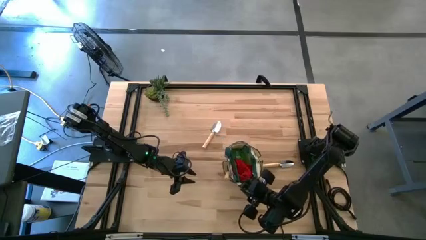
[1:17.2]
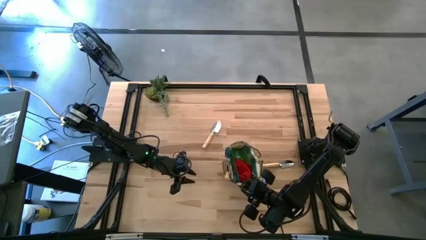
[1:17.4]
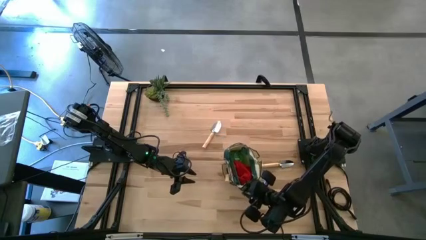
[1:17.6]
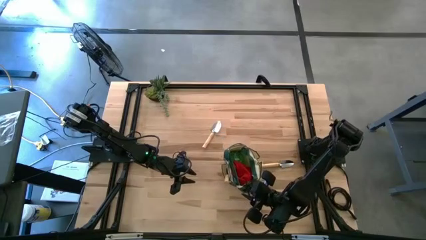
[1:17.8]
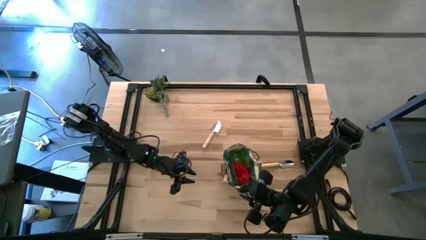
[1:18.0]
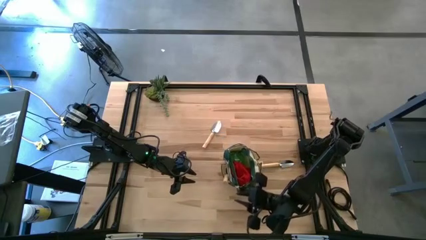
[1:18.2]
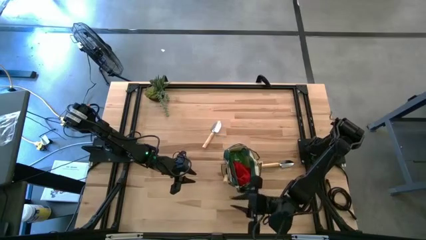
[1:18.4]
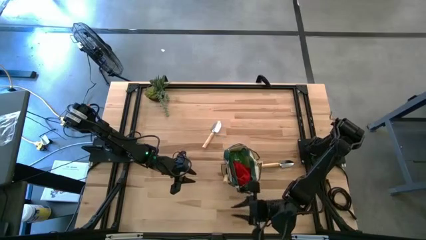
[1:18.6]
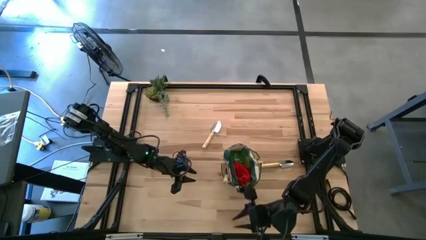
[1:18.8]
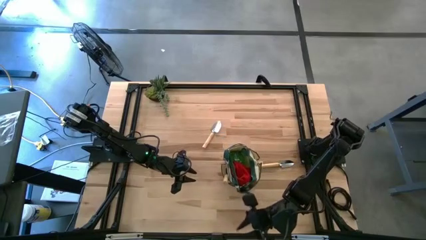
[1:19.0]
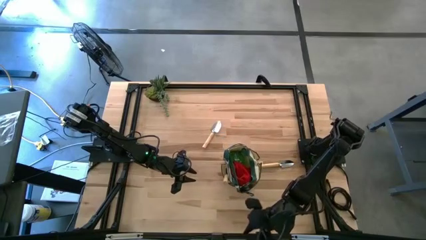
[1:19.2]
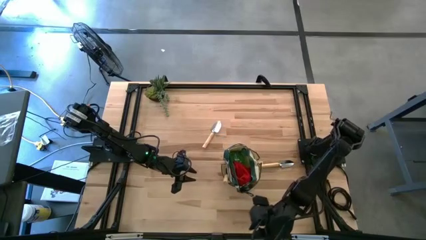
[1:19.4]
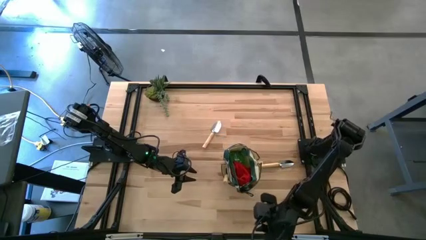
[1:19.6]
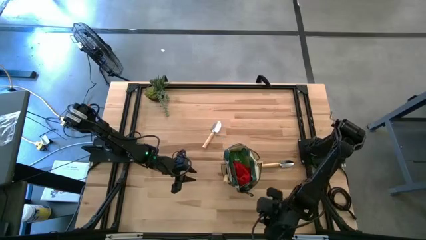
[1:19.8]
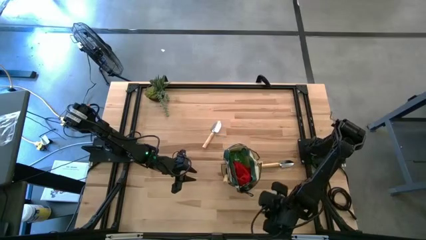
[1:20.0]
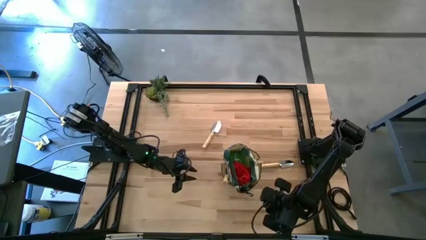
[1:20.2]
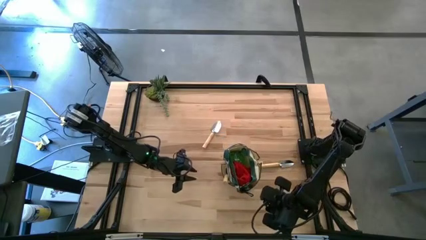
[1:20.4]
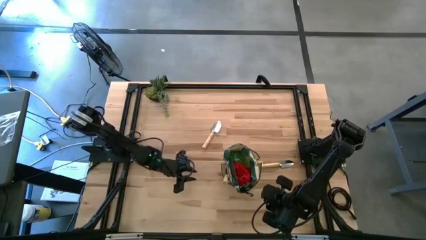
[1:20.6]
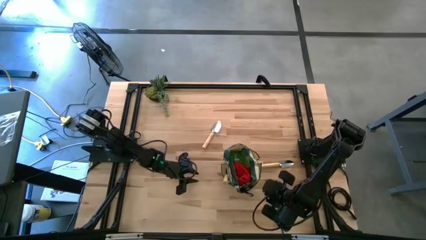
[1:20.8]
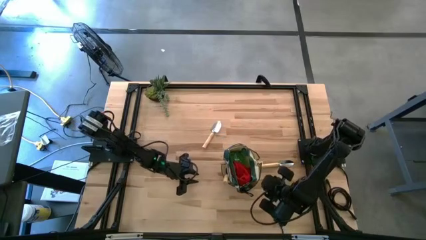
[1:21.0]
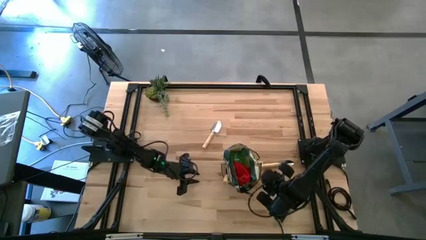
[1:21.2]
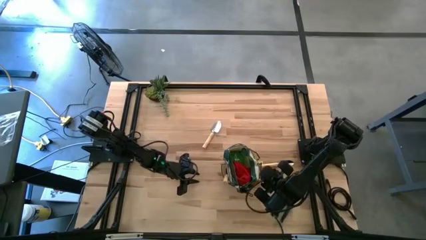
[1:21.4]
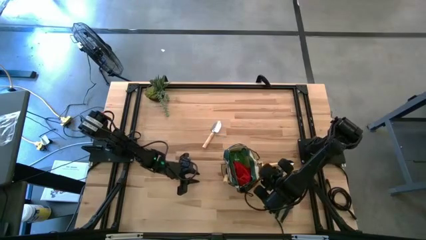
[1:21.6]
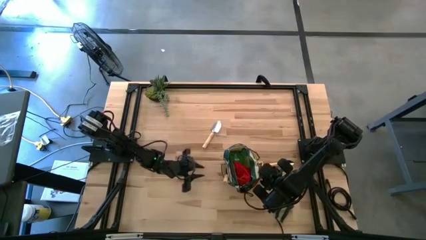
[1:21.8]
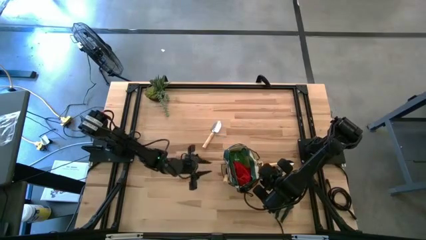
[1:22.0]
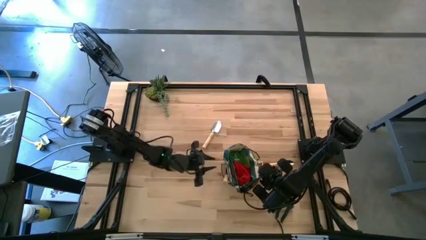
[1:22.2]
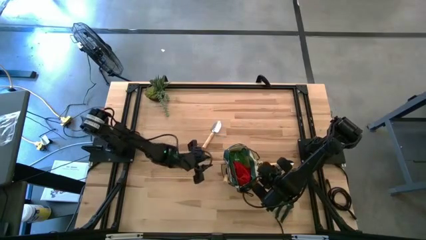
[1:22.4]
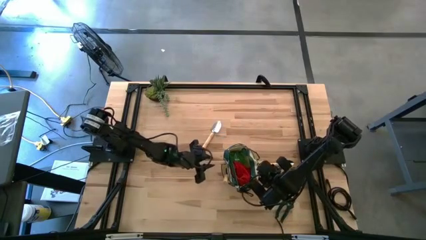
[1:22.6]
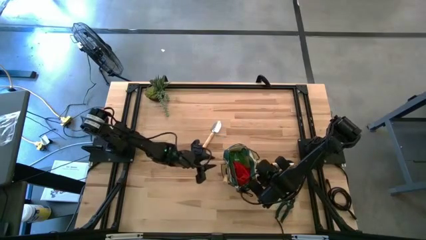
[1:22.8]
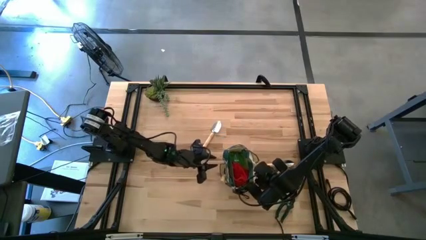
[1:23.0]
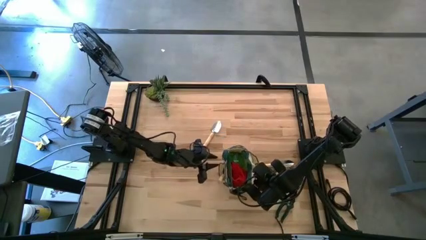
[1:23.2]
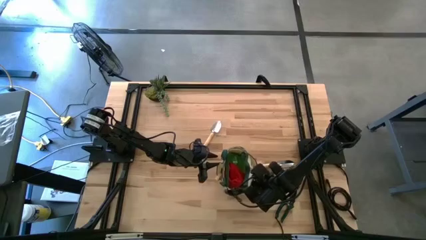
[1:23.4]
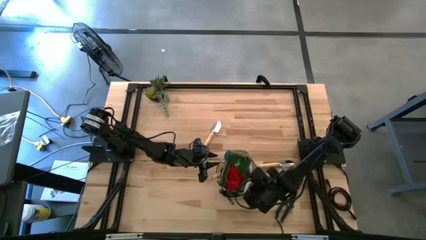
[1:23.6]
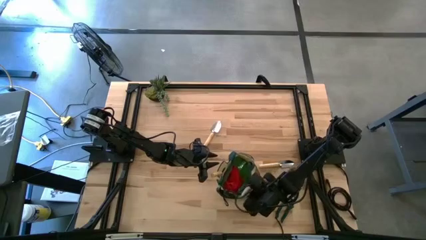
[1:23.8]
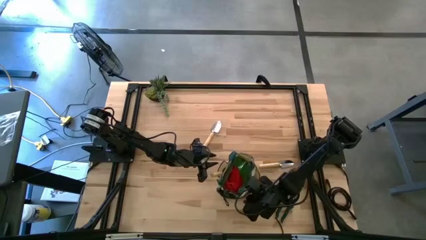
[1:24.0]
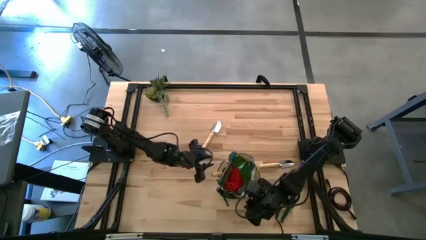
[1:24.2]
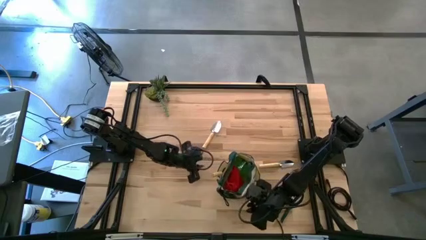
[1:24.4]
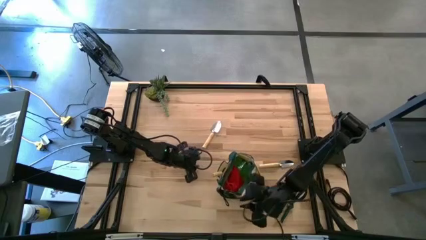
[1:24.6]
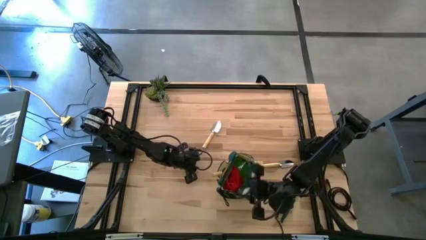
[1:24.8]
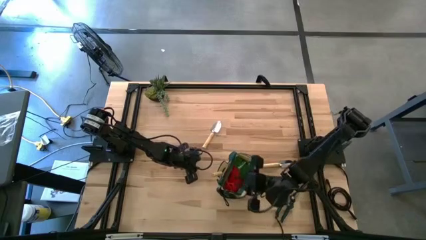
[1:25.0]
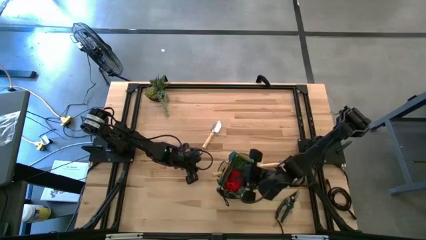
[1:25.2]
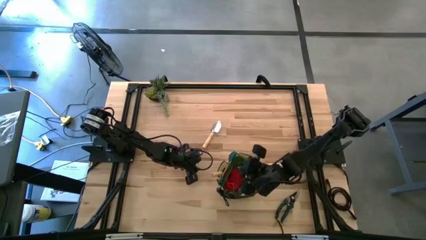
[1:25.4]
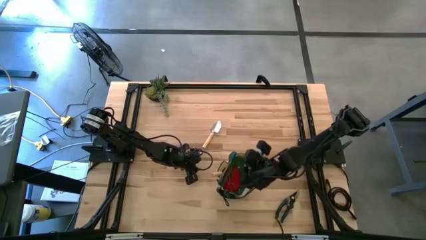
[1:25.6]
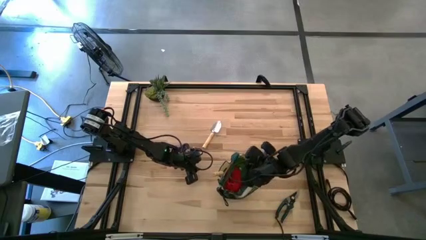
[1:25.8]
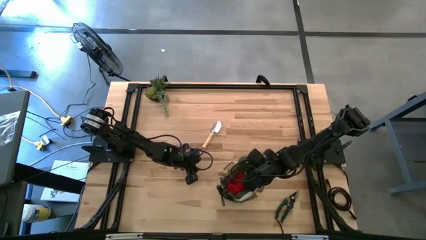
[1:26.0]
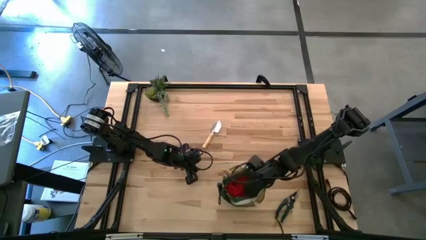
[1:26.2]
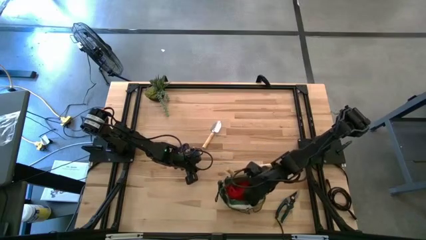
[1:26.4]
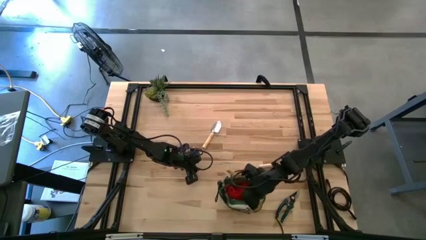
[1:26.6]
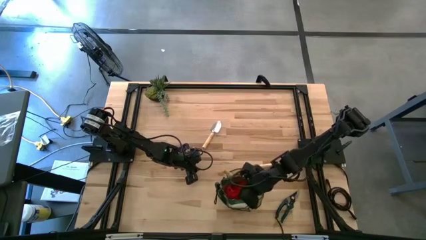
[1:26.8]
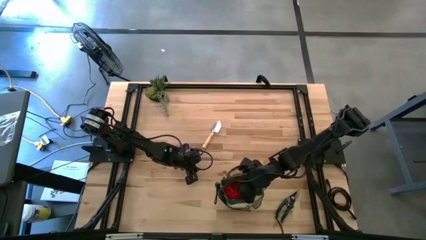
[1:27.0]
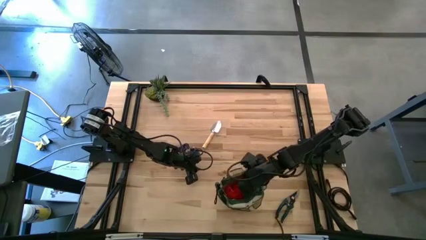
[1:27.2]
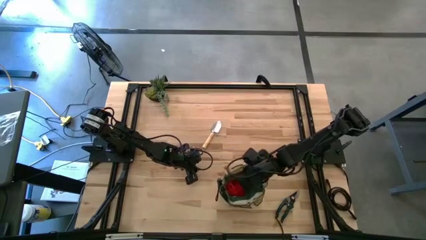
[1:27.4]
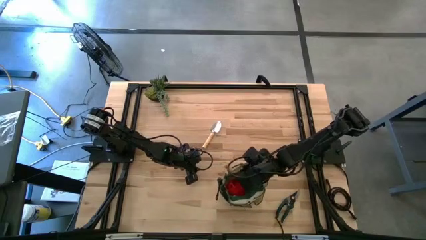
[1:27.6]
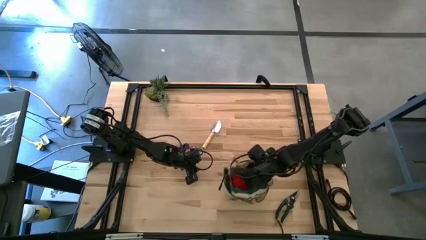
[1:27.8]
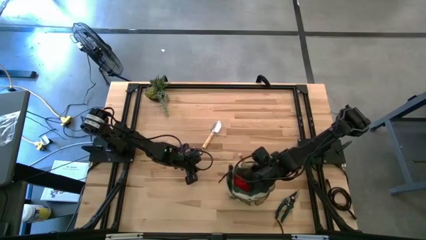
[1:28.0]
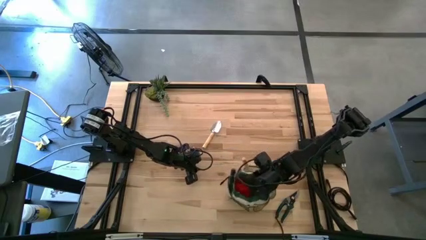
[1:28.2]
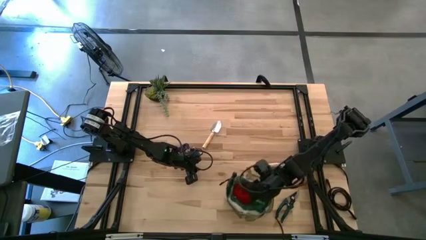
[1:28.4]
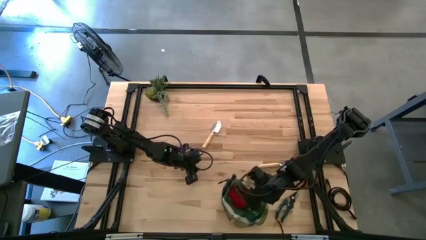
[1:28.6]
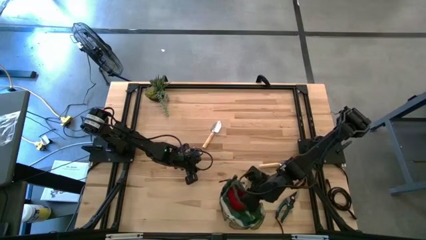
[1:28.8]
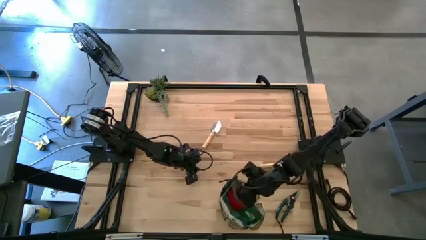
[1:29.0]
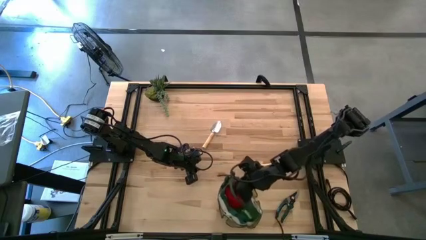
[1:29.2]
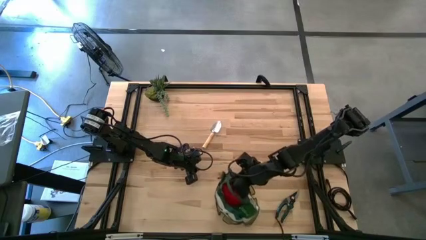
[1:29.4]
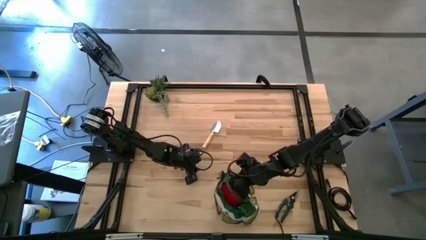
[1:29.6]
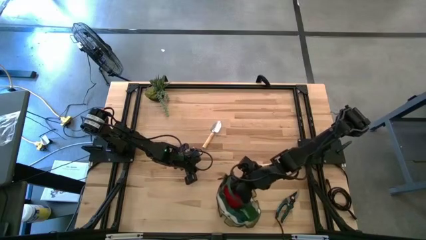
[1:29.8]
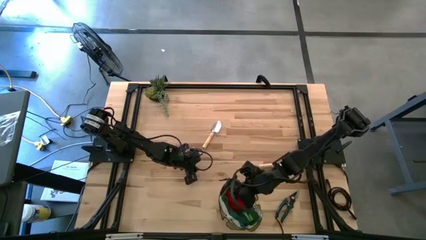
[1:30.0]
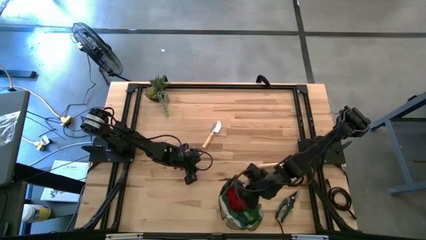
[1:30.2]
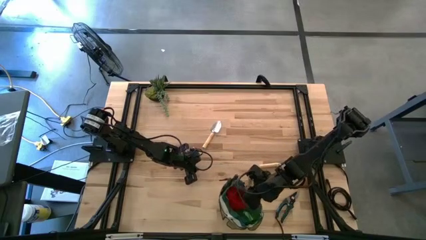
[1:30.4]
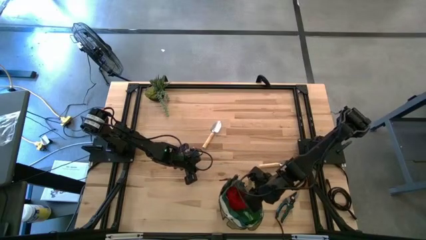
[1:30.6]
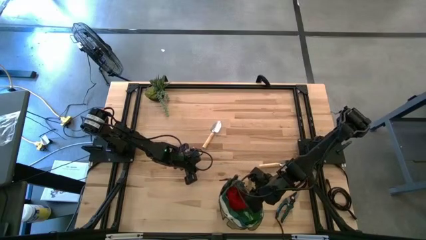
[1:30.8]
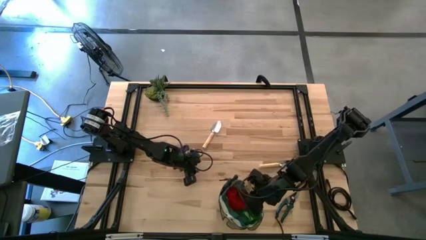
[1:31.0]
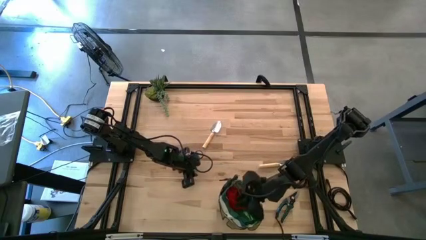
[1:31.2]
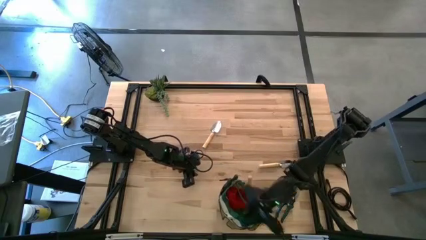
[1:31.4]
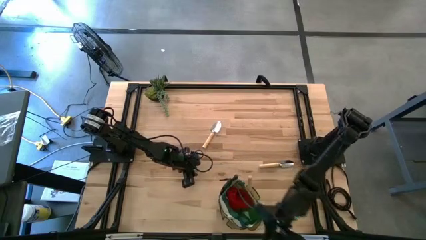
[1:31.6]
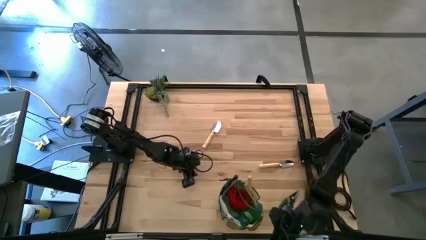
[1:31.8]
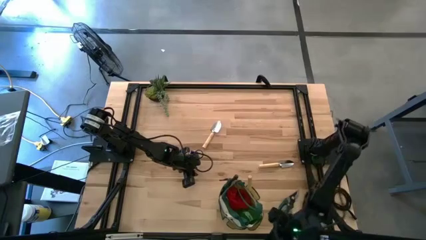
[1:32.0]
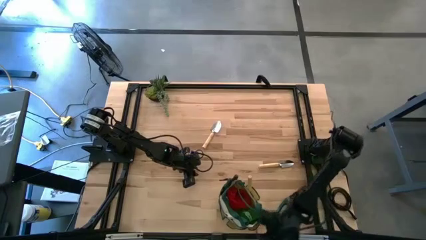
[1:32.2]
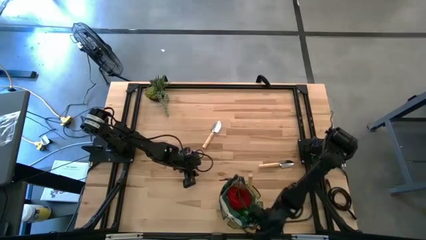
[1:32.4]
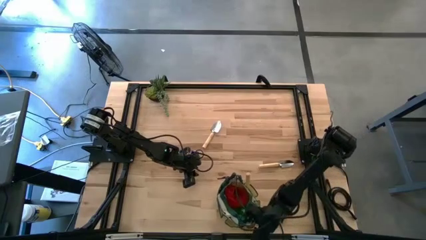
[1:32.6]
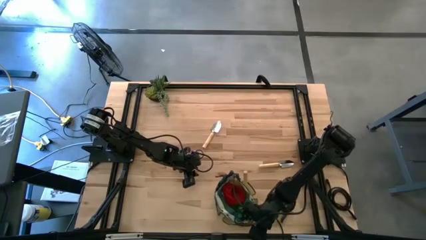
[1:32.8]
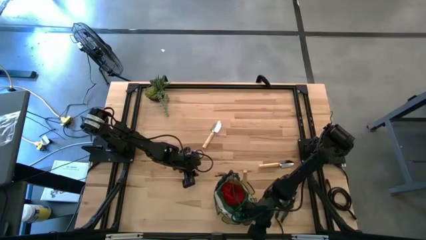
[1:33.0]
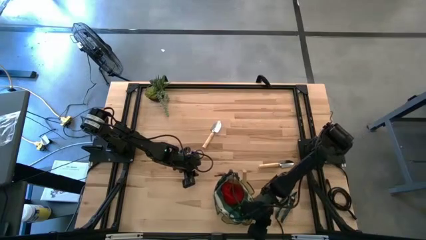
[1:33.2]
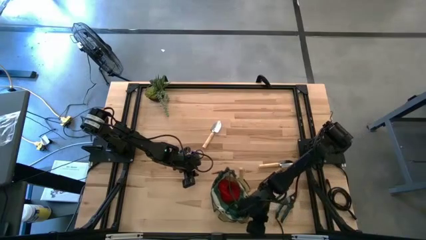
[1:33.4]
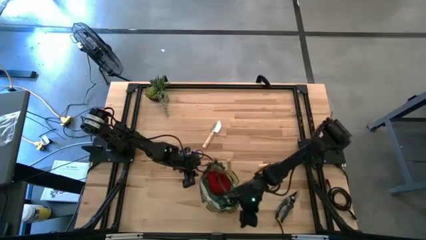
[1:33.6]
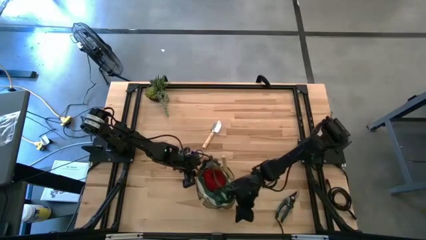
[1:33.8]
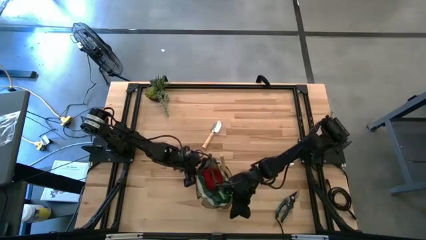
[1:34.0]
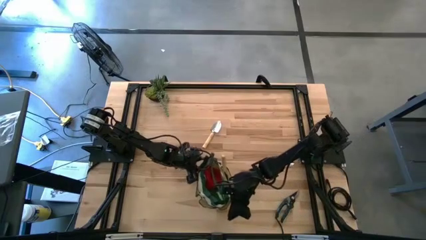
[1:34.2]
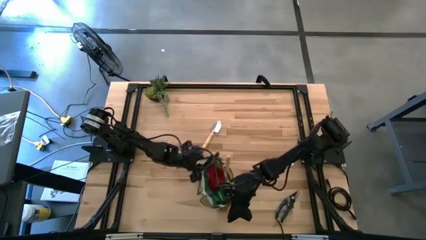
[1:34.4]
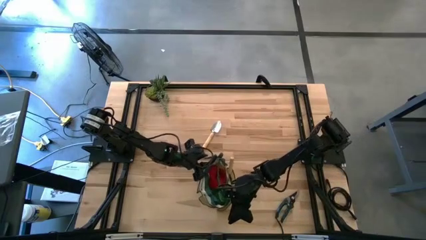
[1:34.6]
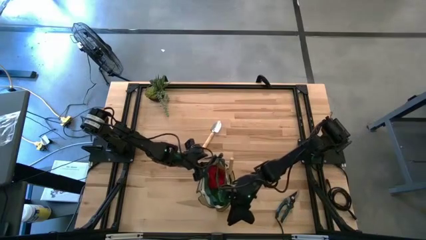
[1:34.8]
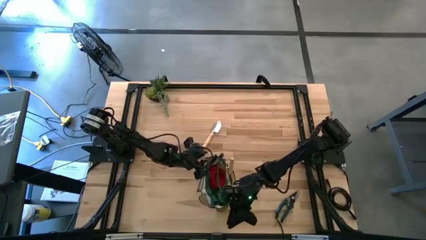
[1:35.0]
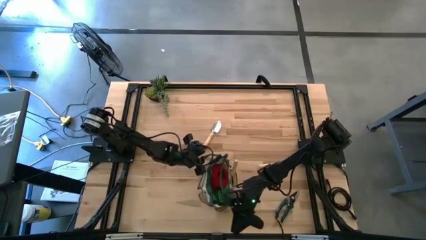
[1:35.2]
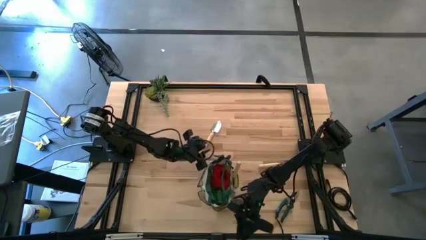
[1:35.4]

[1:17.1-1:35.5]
Task: Pick & Place Garden tools in Gardening bag
Move the light brown gardening bag to the botton center of the table
